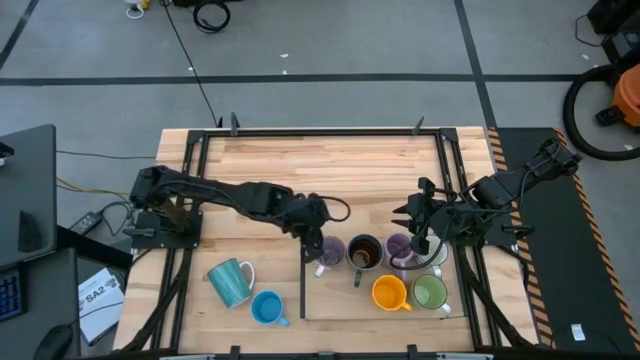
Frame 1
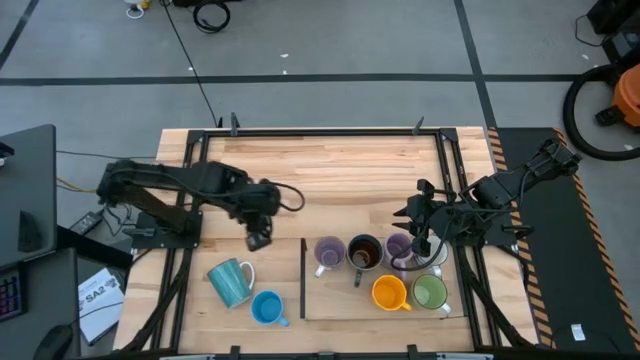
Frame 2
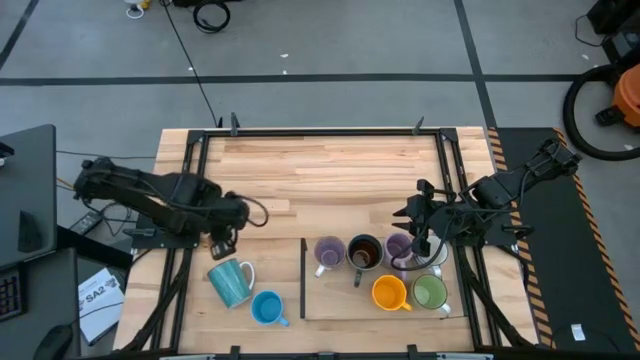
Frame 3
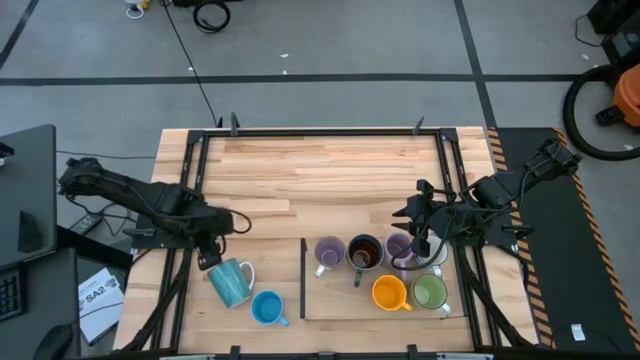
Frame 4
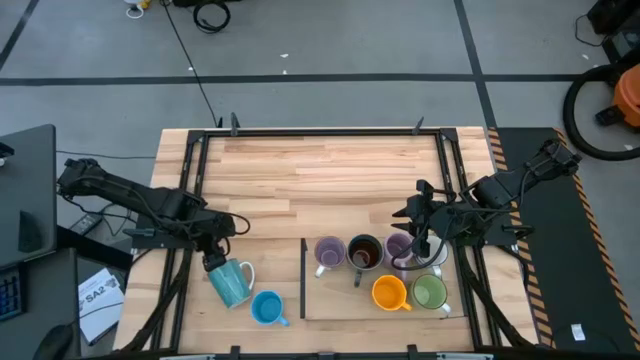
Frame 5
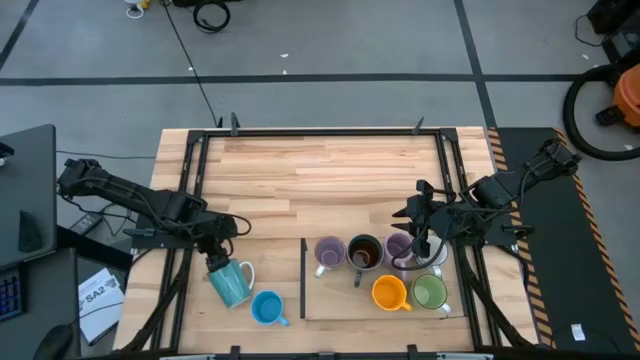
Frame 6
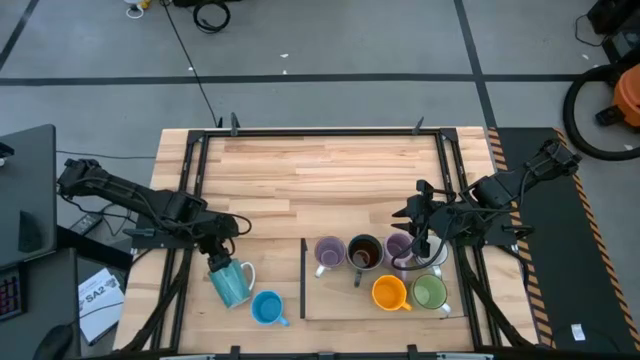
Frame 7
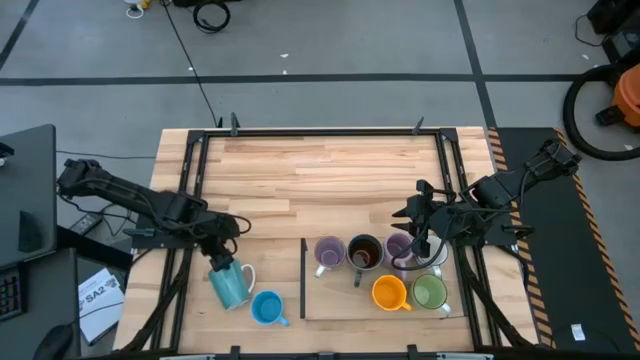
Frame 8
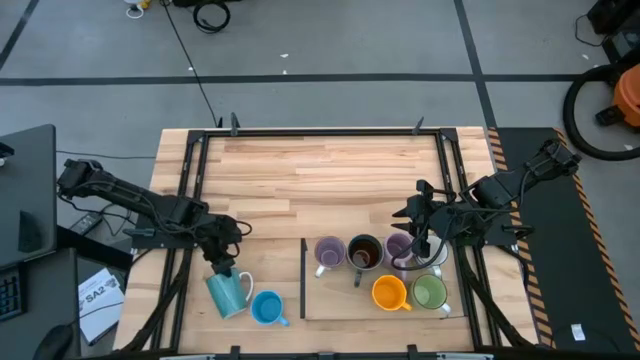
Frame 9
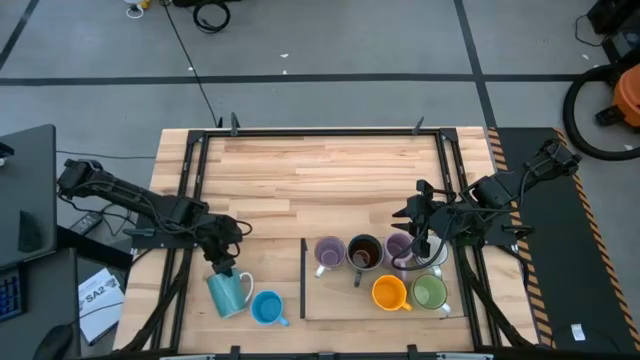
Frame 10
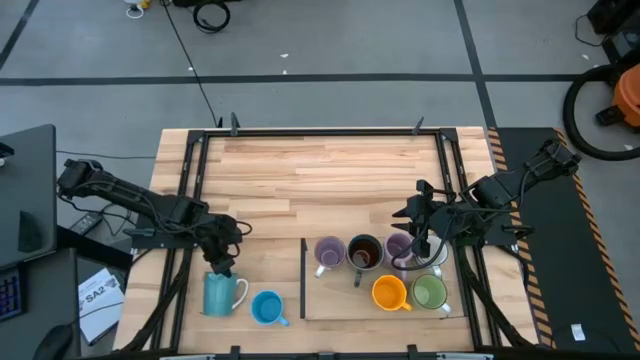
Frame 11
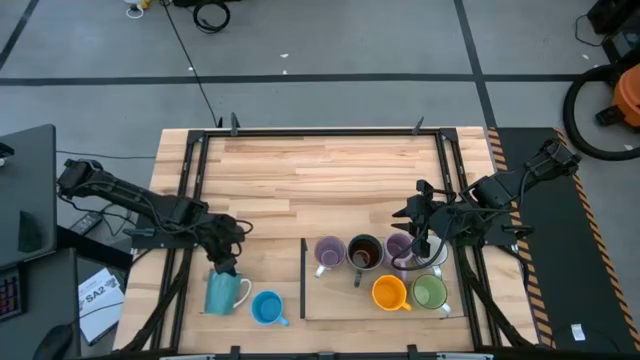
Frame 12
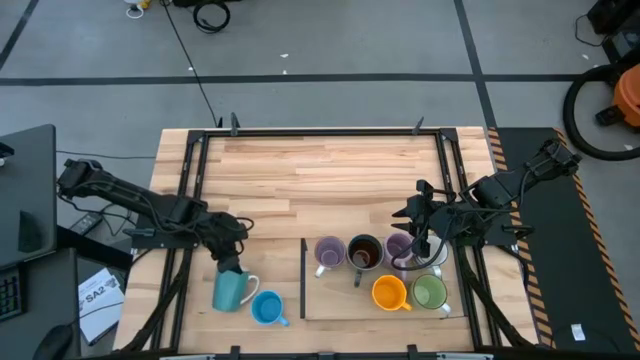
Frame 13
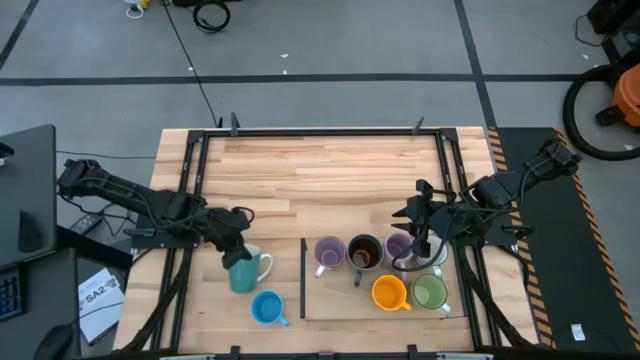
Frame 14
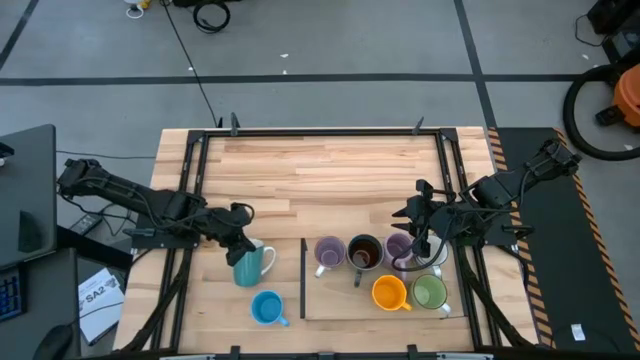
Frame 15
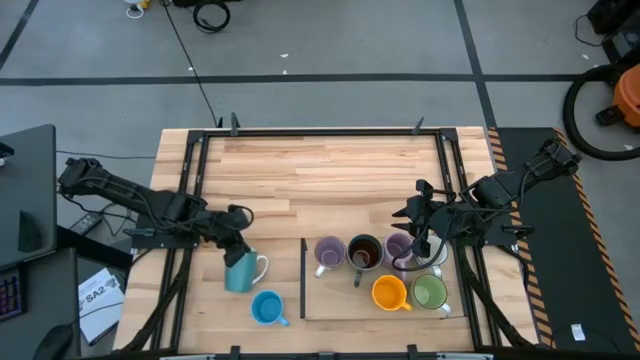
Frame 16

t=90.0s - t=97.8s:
Task: Place coffee mugs
Put the light green mug on the shelf aligned with the blue mug

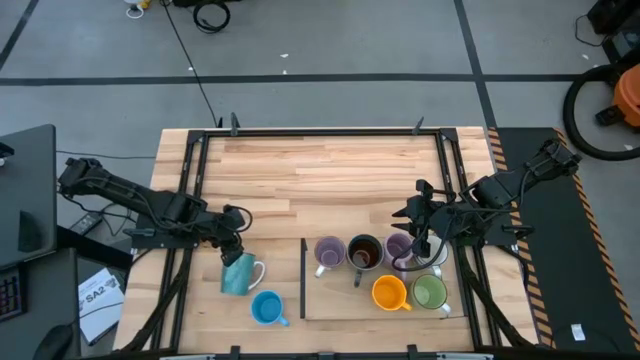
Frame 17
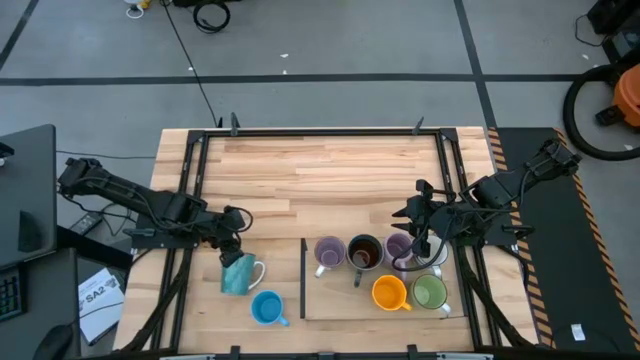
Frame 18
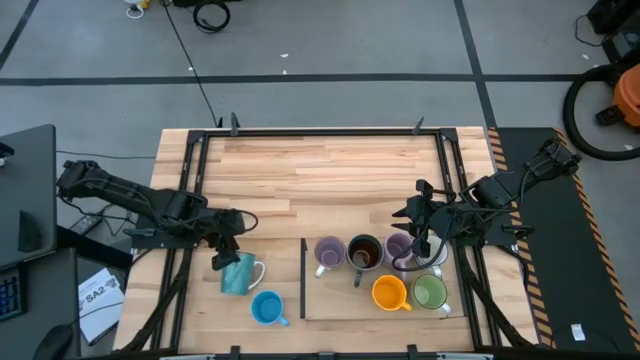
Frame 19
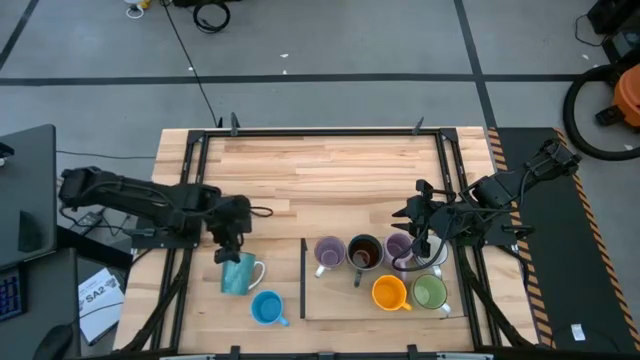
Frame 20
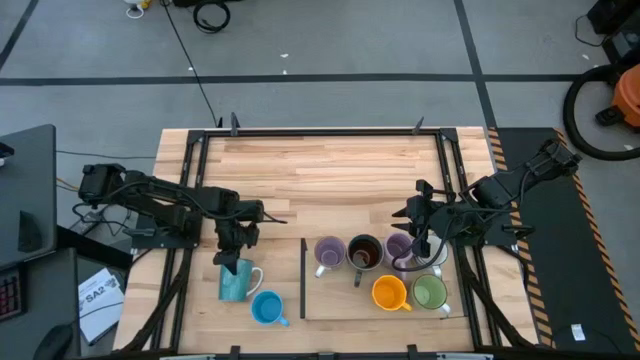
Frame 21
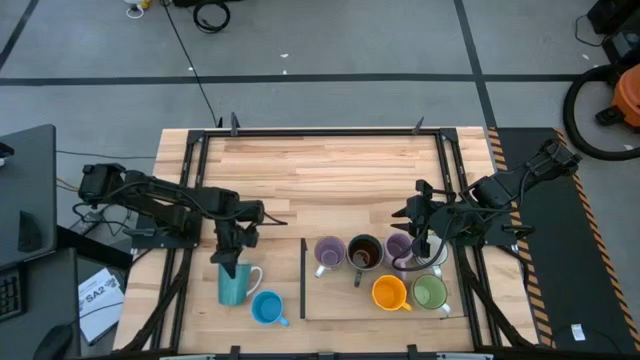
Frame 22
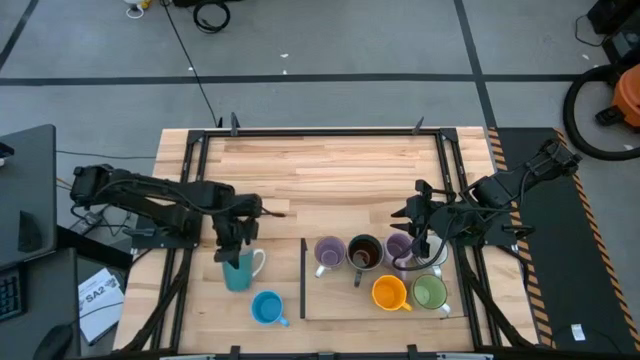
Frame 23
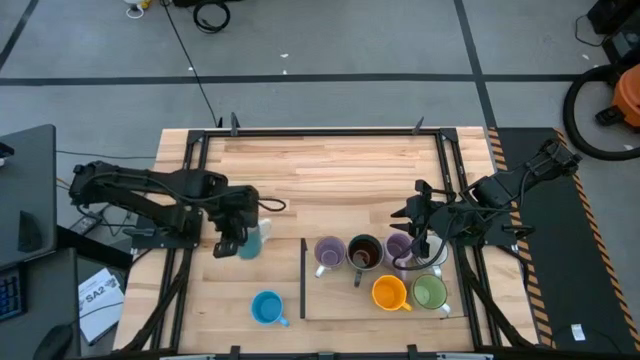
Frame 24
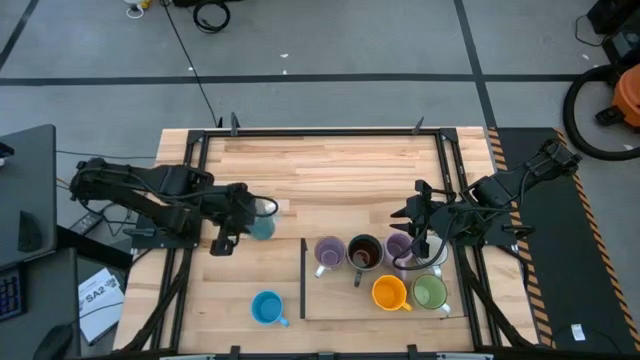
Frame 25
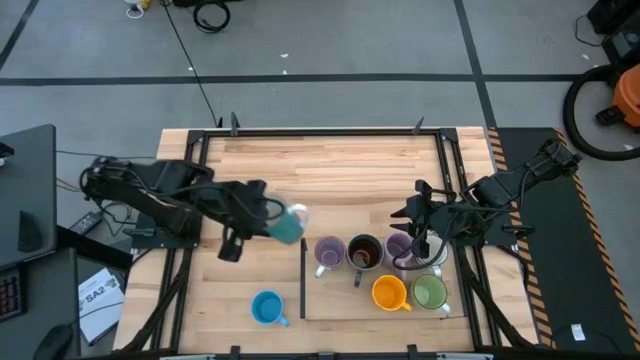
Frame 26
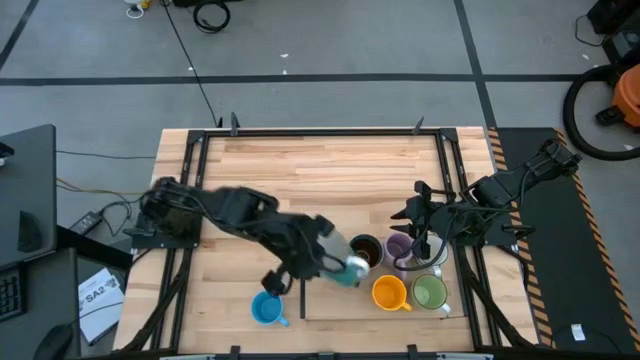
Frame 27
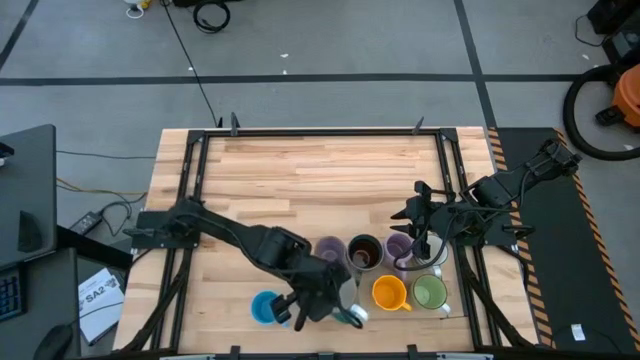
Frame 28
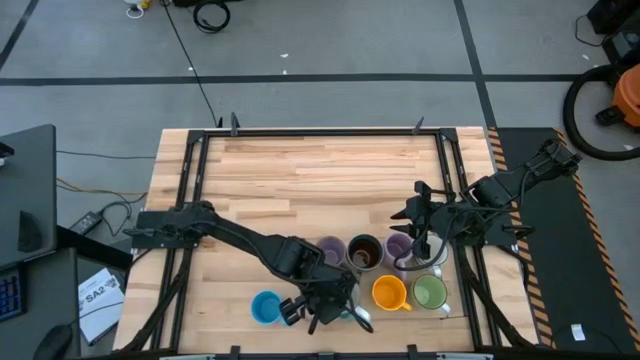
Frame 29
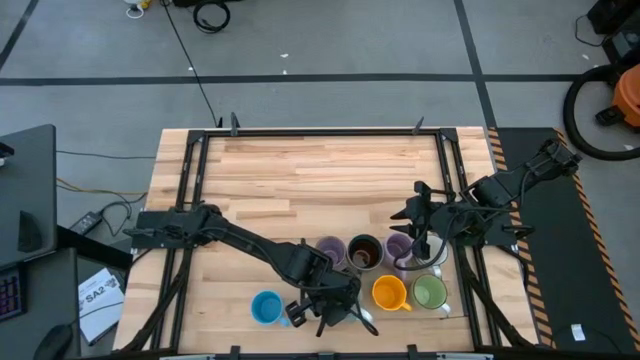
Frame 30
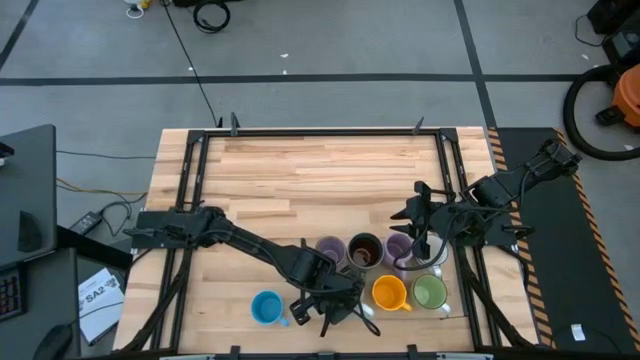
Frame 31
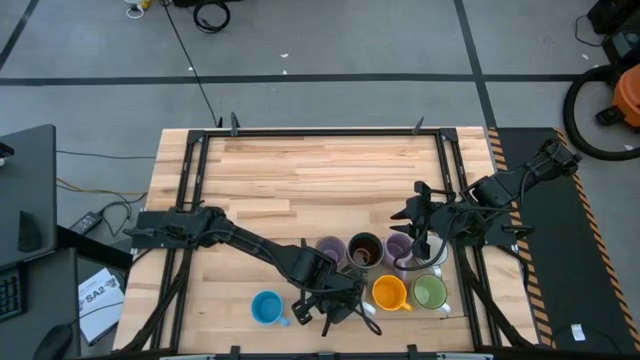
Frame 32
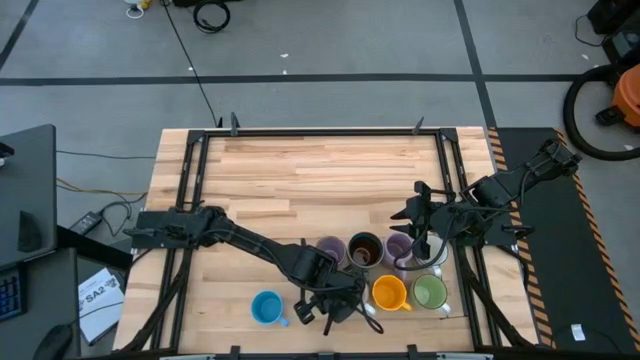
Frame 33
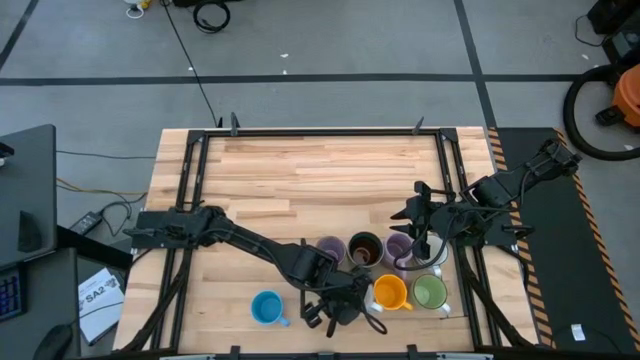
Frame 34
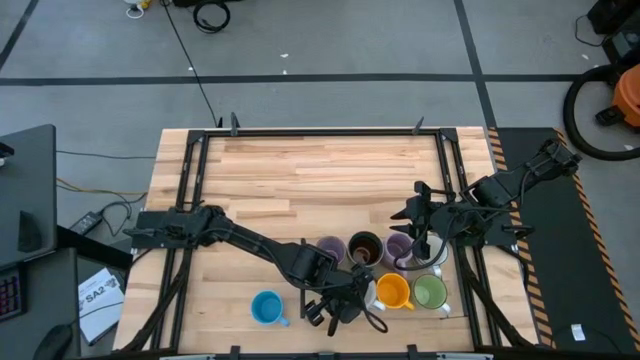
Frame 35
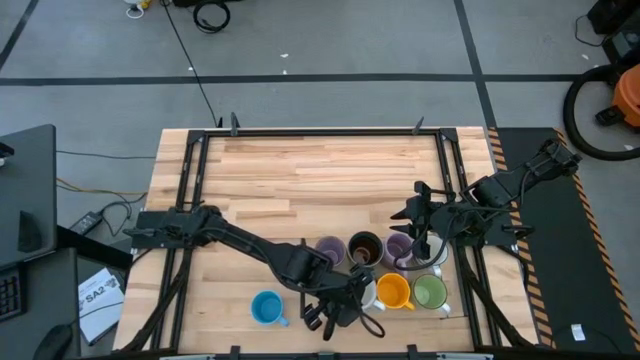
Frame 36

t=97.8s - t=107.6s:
Put the light green mug on the shelf aligned with the blue mug
